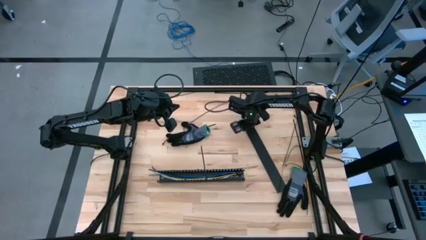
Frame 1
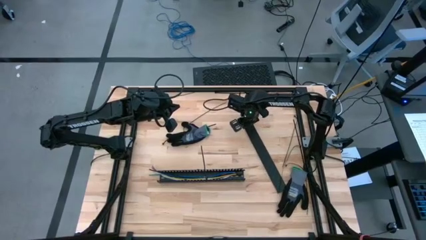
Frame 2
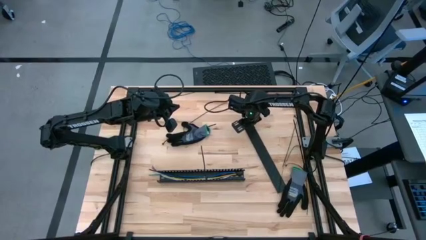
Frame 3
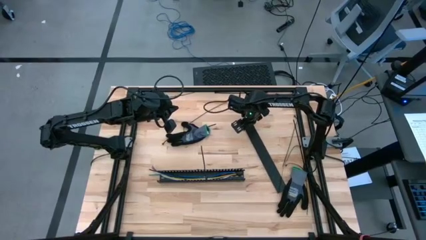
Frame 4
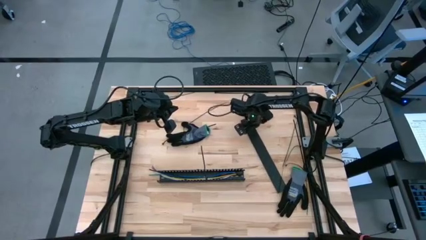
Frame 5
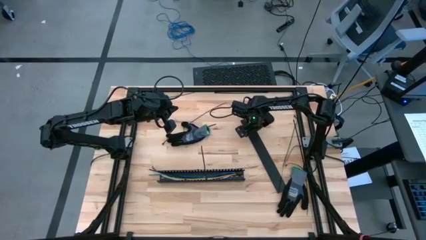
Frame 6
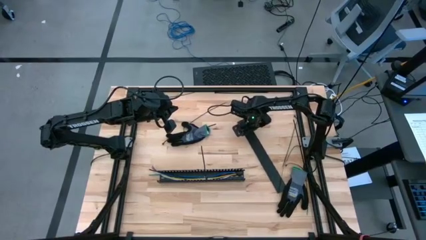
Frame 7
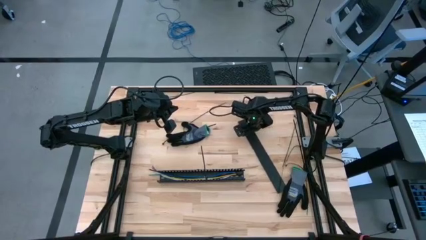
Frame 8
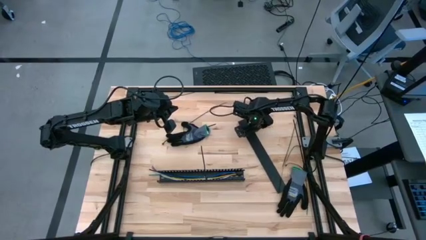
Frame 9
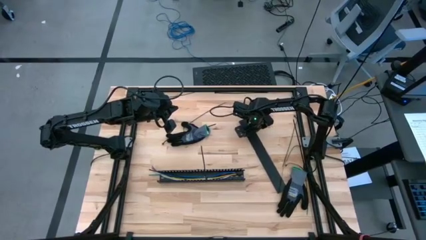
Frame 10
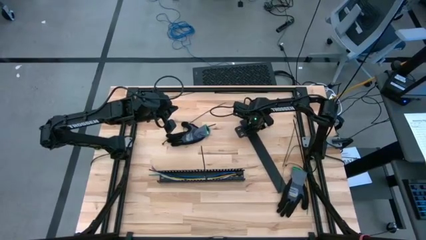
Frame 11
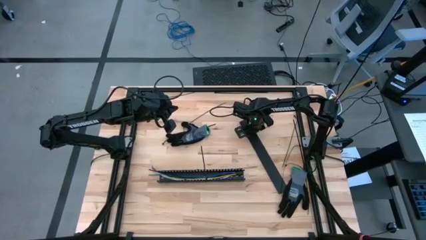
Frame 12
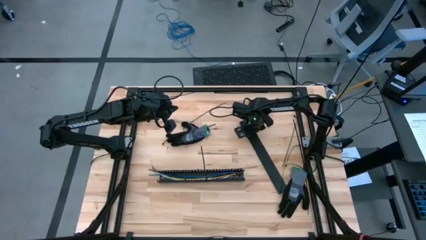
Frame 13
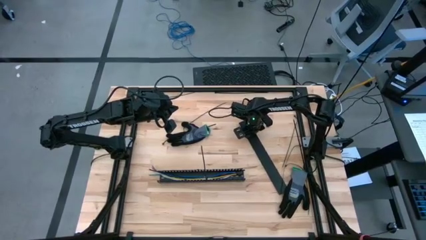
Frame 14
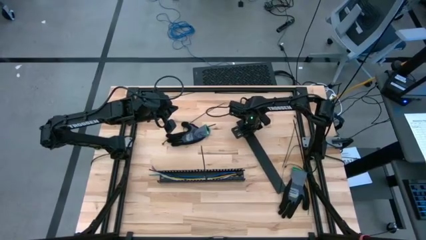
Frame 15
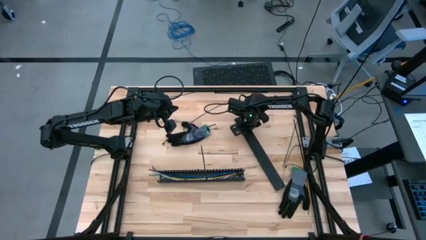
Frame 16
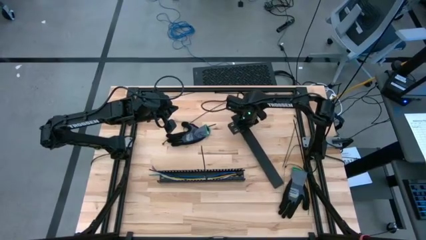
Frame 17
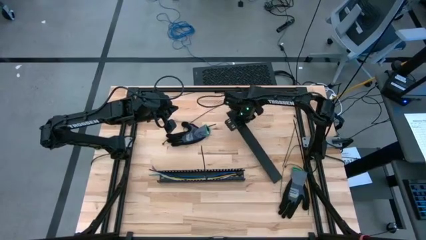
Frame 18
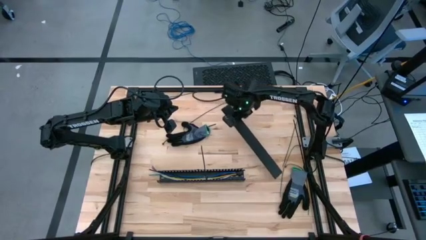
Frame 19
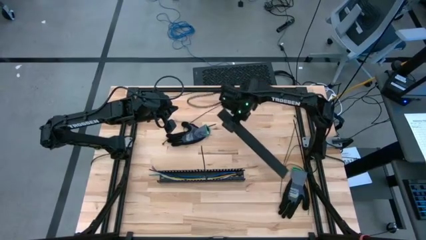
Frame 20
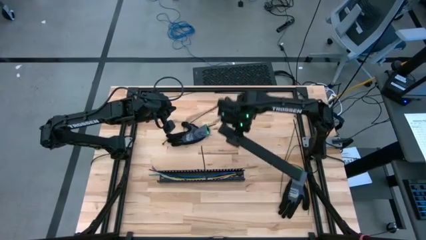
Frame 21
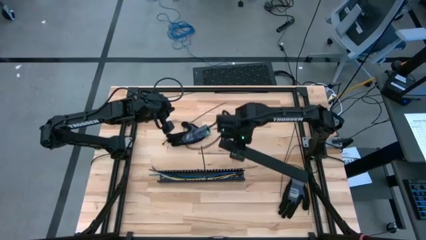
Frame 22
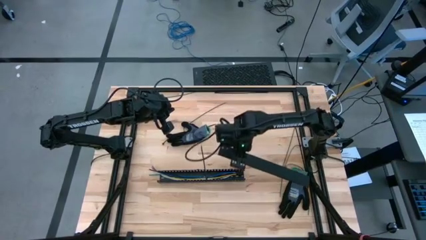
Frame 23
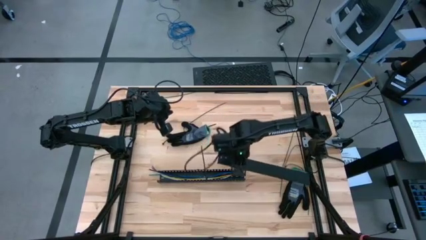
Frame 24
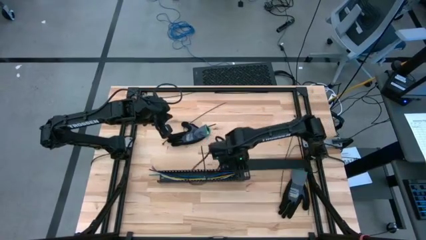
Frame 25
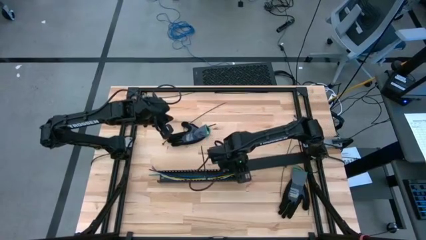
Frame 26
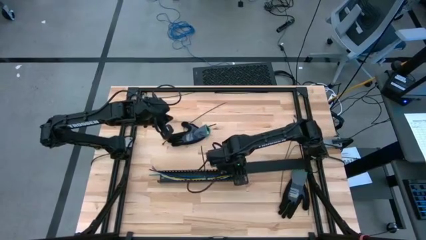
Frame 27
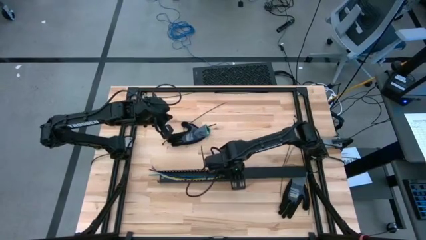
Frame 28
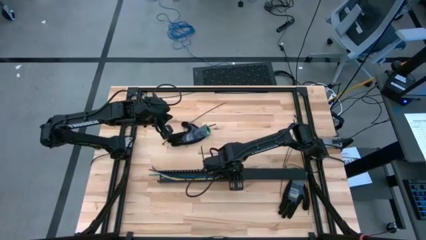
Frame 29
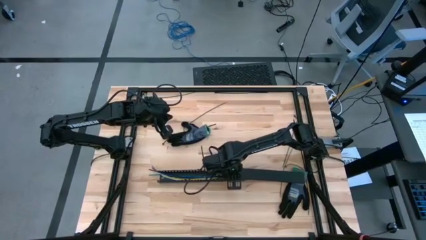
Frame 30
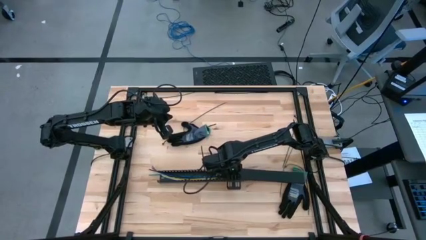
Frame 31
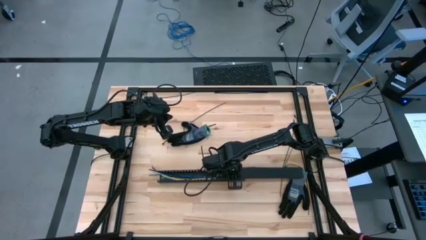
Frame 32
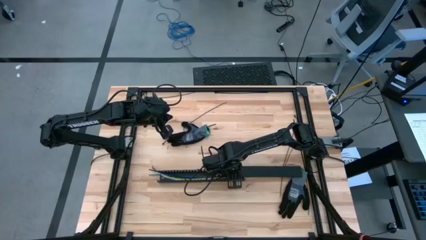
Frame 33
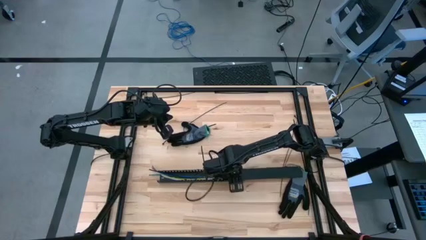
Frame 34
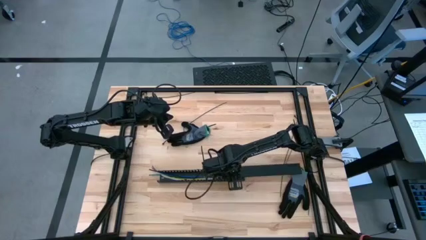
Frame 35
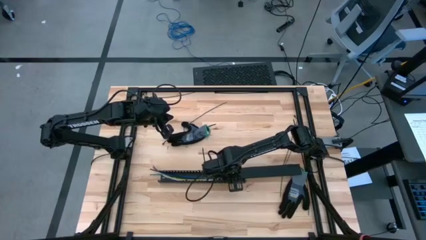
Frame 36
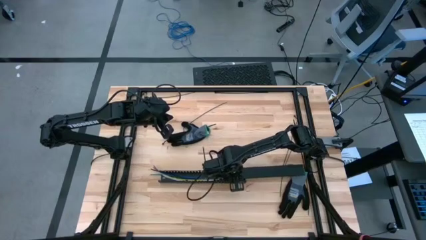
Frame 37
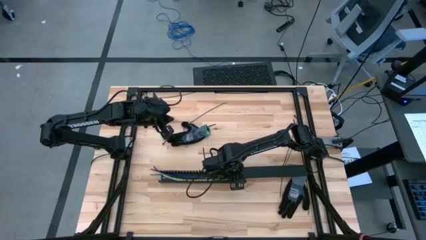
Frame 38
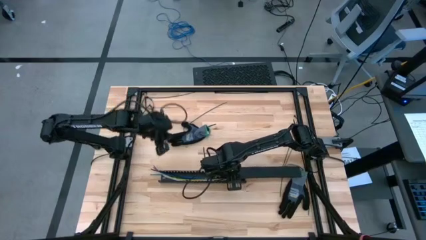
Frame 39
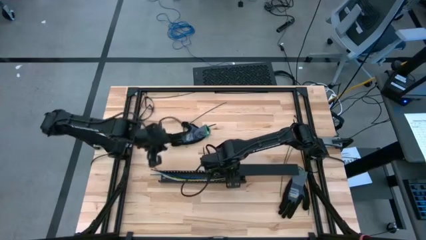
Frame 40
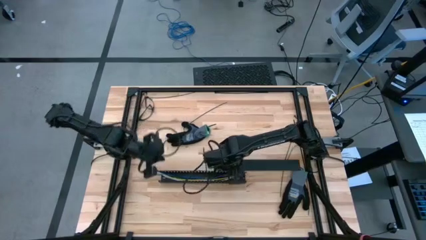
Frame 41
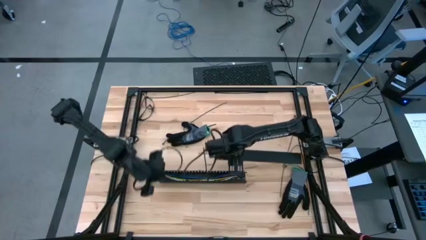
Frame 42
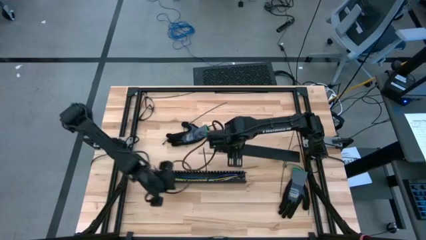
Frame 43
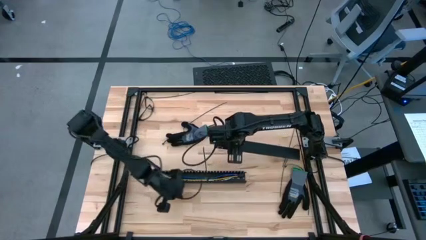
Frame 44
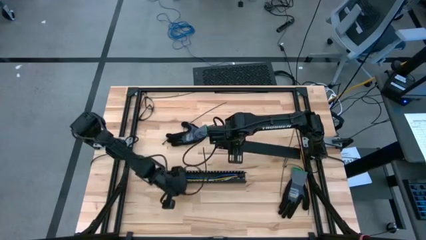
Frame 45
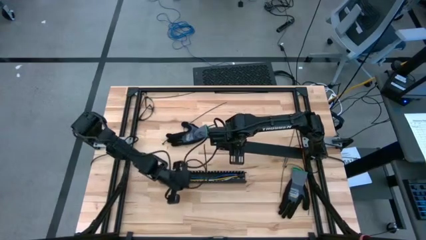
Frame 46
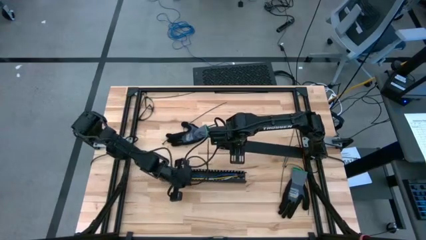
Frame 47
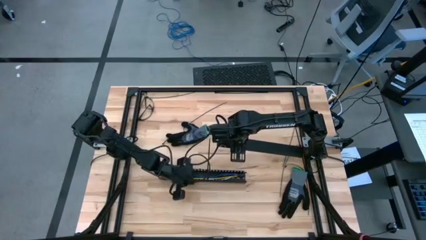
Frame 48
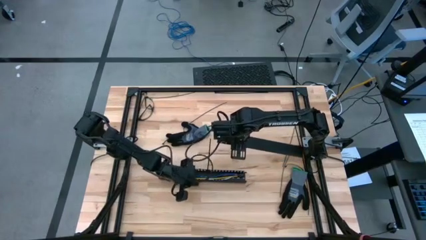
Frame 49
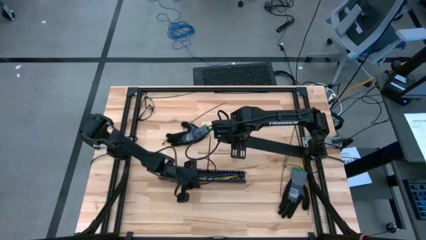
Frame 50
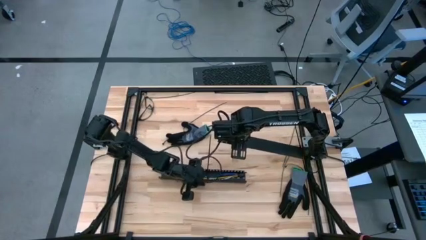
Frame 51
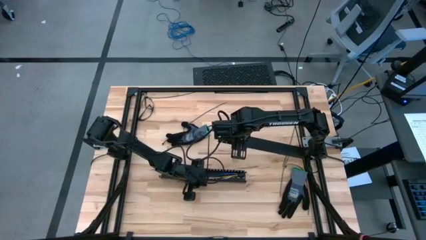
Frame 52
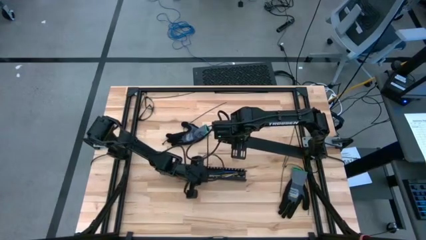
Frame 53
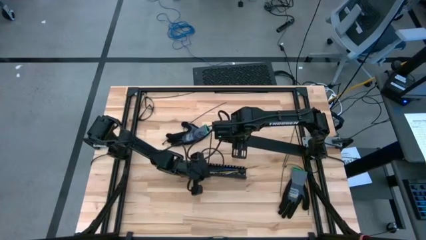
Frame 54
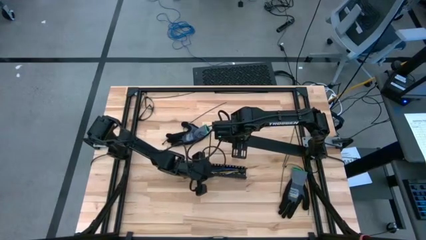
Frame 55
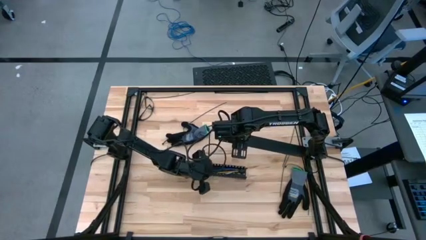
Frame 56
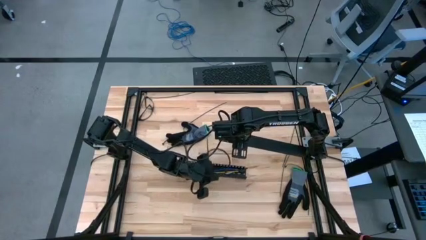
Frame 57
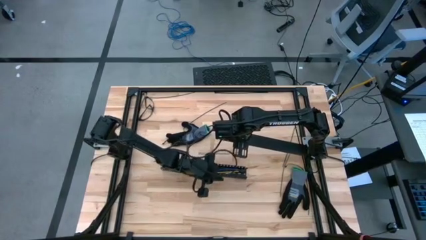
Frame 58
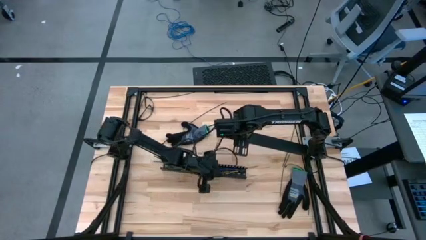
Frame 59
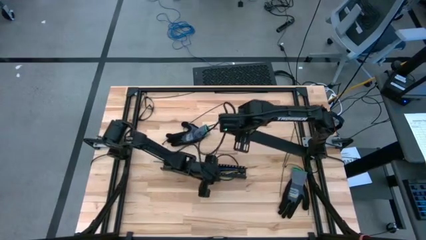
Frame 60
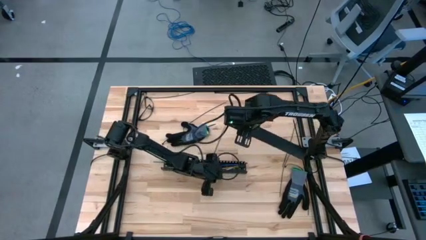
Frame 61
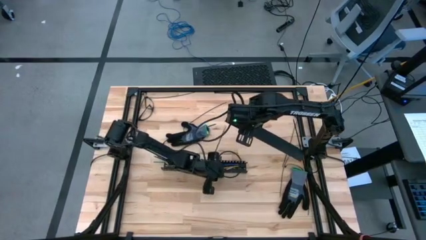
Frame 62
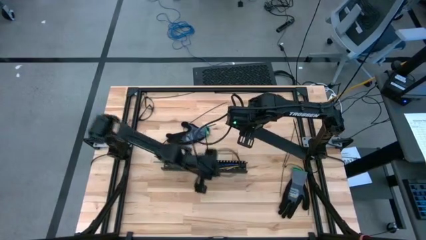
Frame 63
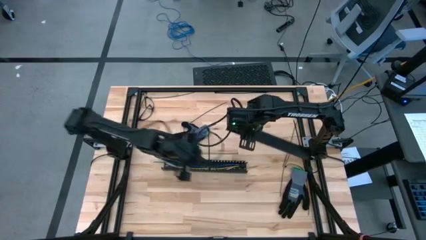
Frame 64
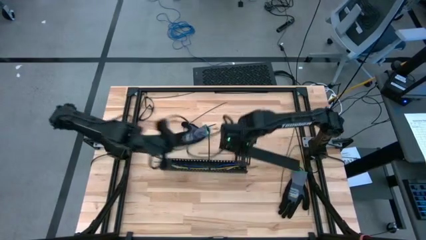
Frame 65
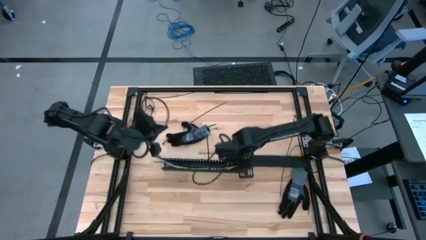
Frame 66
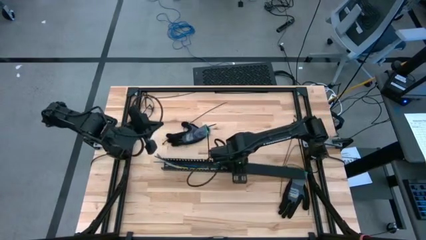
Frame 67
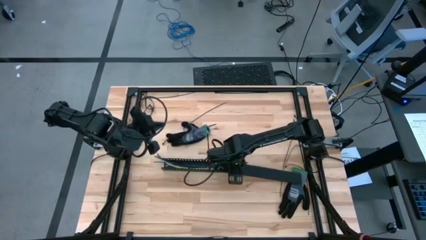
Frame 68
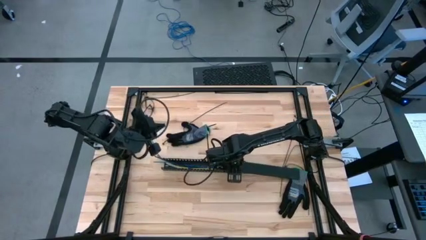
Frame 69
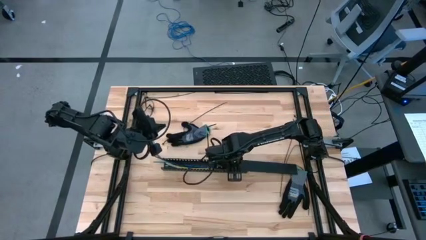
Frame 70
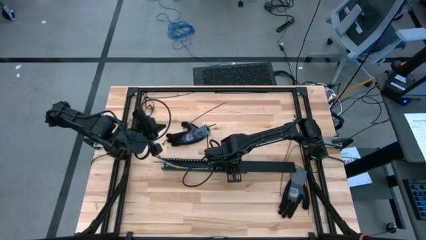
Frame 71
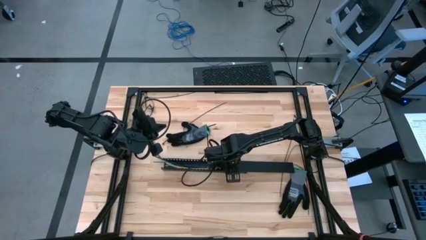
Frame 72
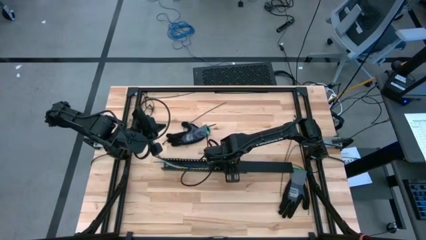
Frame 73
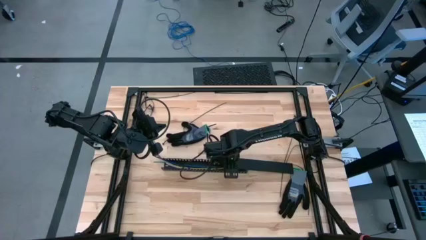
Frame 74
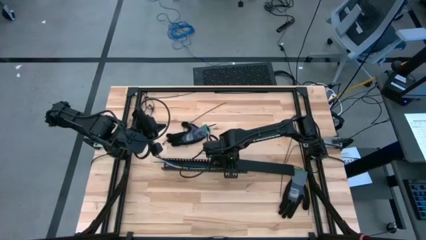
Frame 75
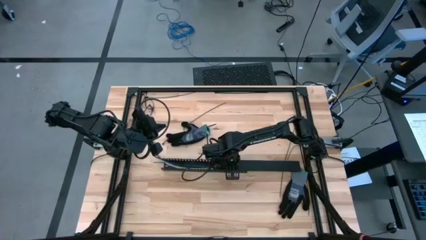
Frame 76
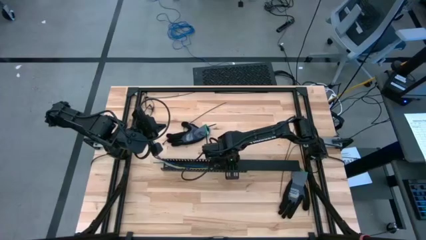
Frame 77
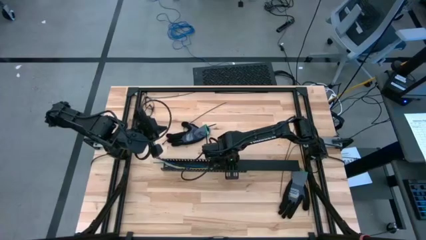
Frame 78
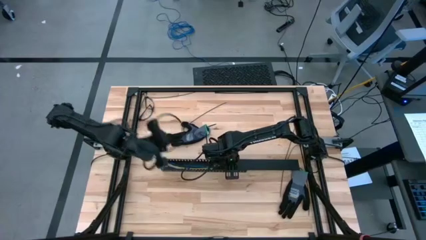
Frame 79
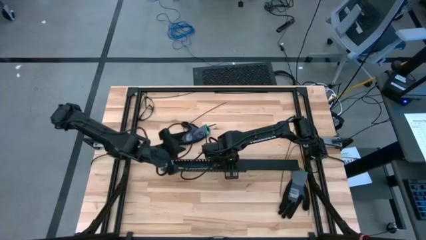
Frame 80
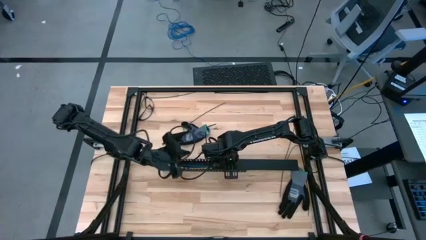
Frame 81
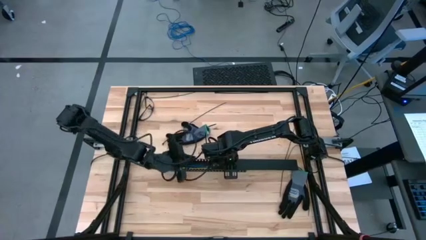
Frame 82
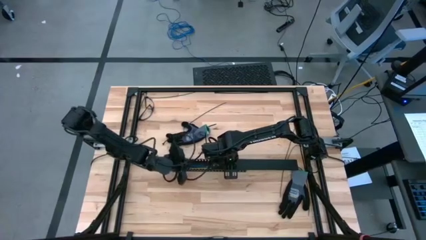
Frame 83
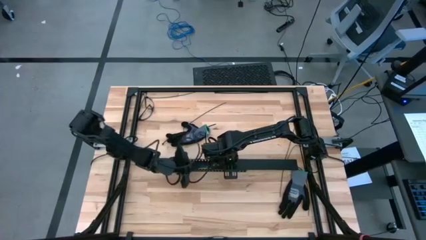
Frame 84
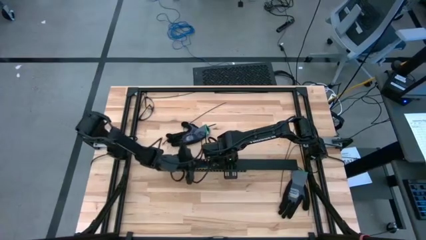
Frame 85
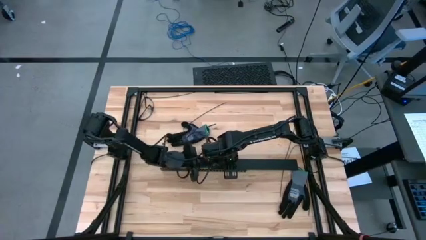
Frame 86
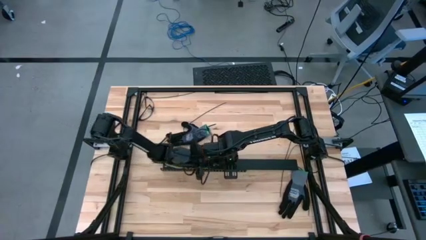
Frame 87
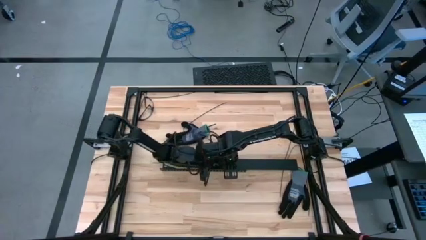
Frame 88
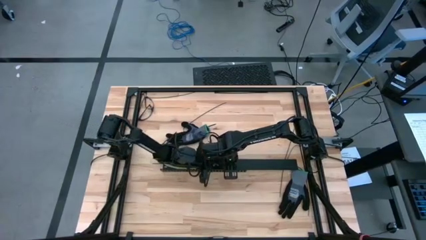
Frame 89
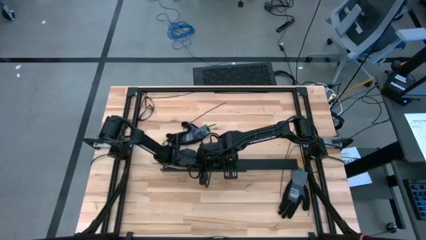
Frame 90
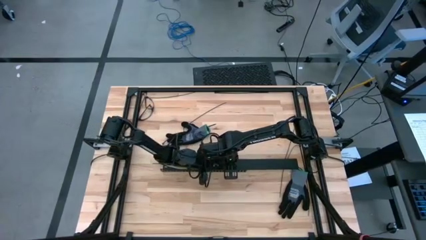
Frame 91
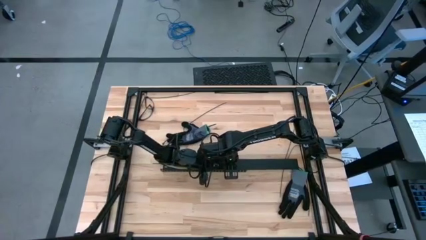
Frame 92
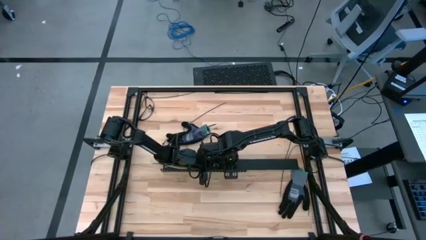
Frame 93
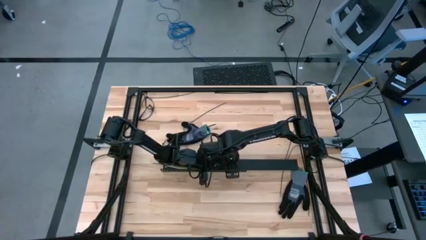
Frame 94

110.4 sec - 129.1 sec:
Task: Ziptie cables
Close the black cable duct lid
